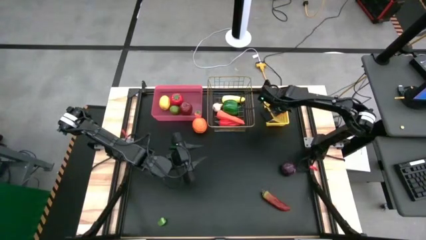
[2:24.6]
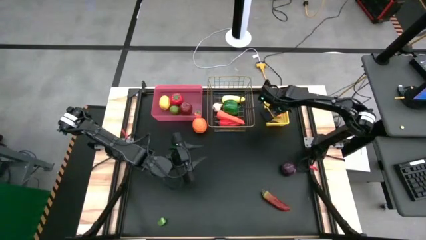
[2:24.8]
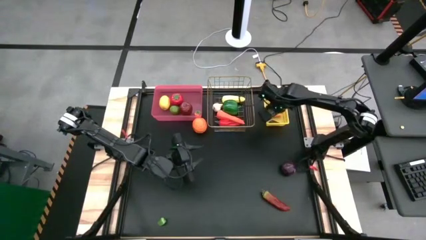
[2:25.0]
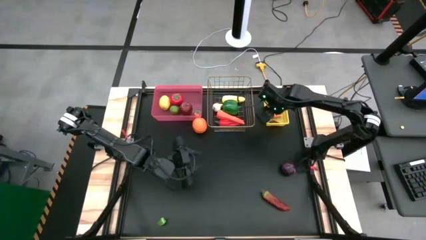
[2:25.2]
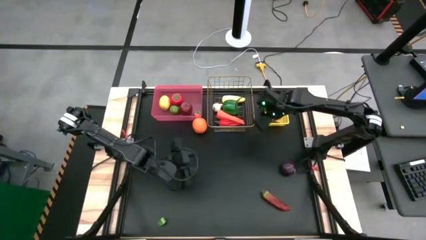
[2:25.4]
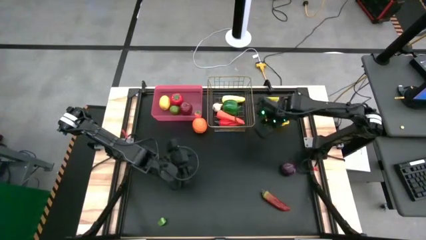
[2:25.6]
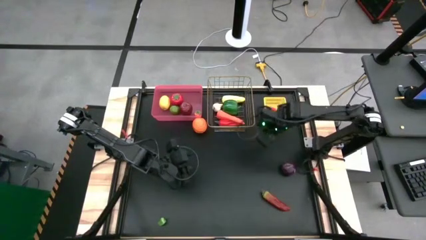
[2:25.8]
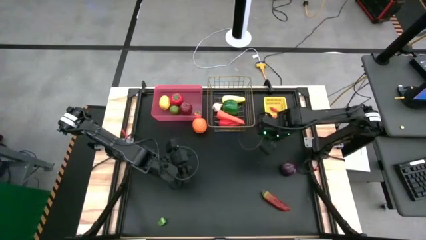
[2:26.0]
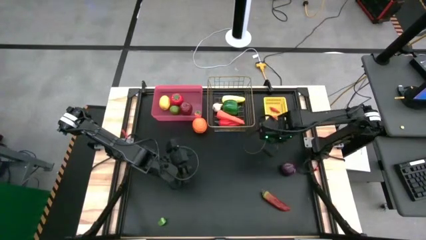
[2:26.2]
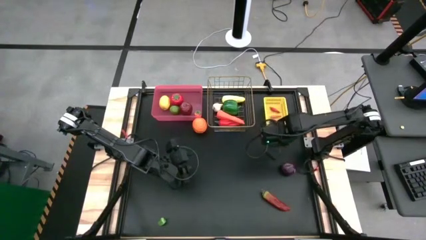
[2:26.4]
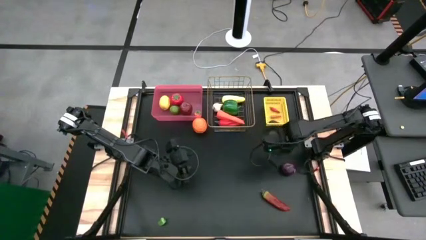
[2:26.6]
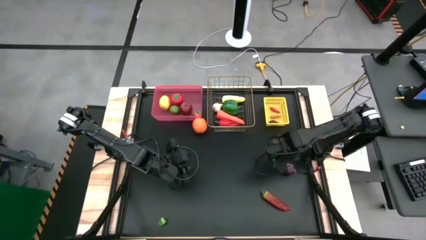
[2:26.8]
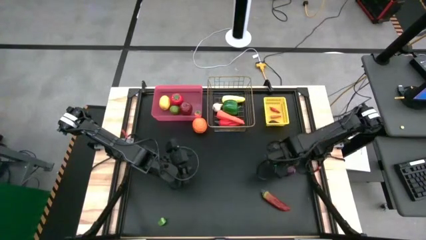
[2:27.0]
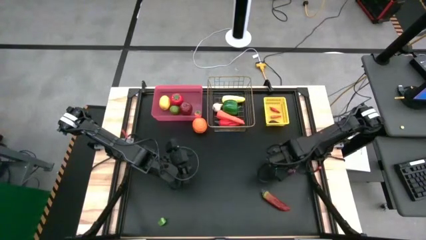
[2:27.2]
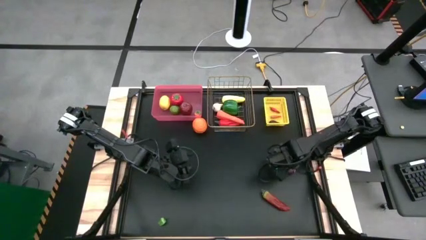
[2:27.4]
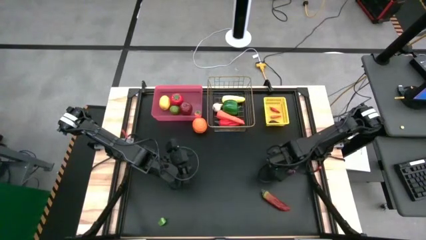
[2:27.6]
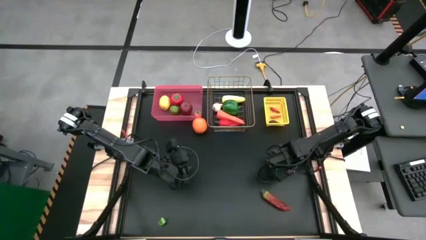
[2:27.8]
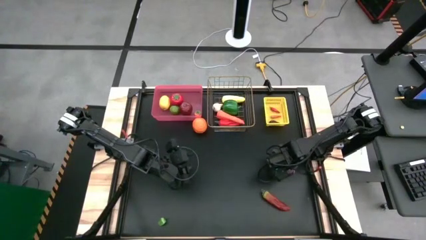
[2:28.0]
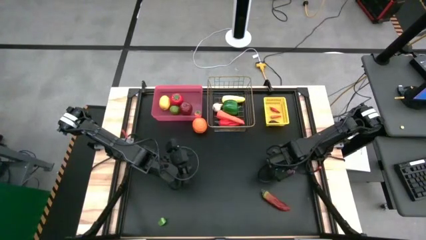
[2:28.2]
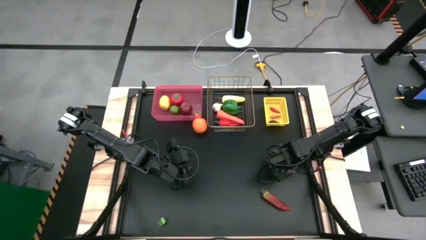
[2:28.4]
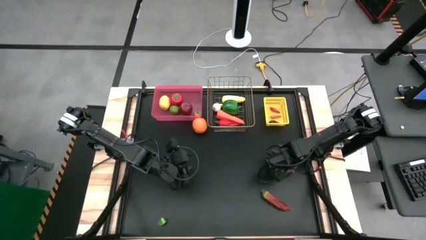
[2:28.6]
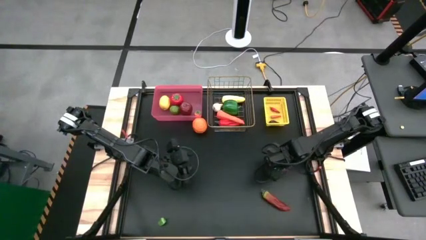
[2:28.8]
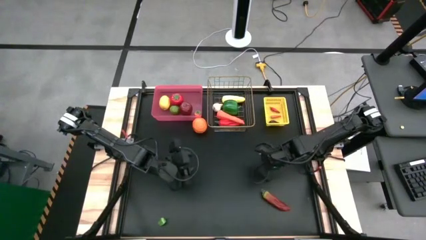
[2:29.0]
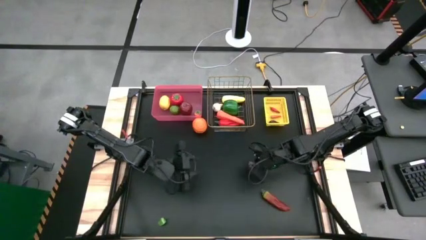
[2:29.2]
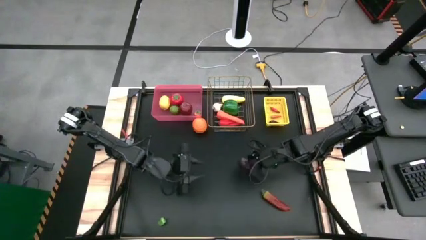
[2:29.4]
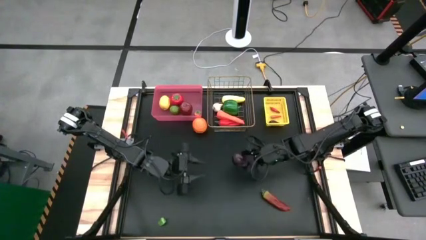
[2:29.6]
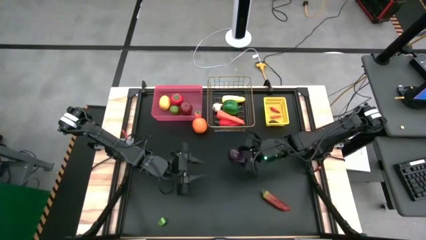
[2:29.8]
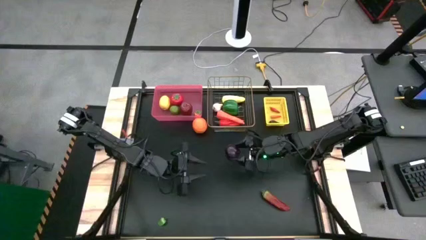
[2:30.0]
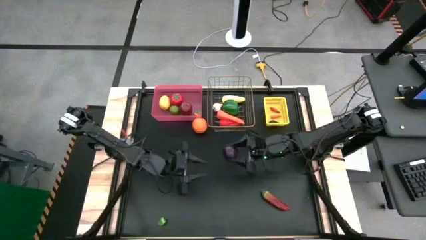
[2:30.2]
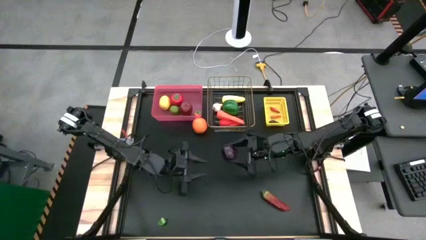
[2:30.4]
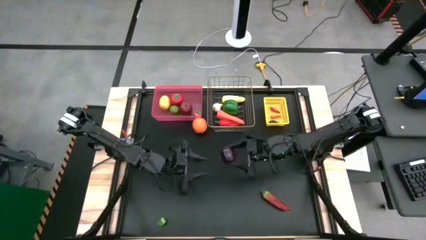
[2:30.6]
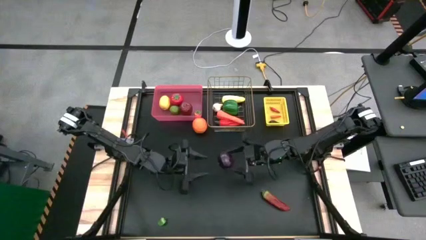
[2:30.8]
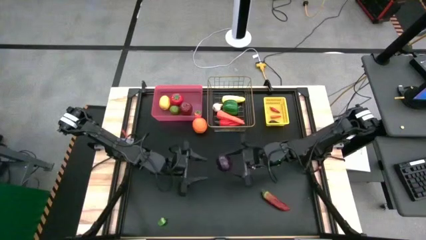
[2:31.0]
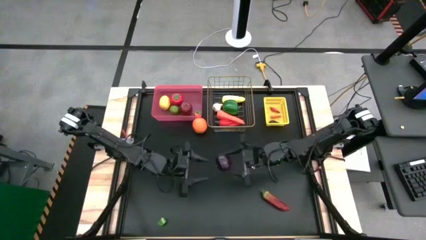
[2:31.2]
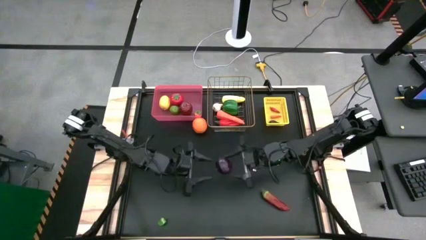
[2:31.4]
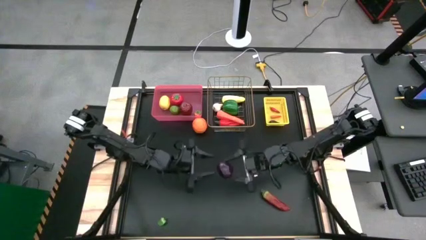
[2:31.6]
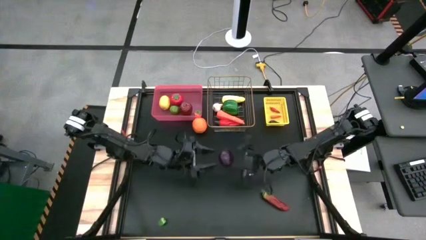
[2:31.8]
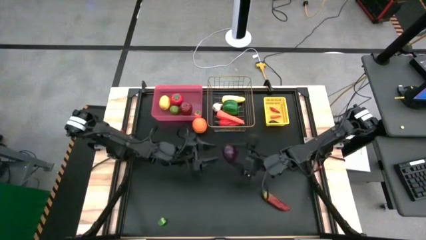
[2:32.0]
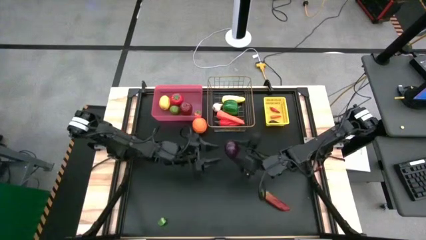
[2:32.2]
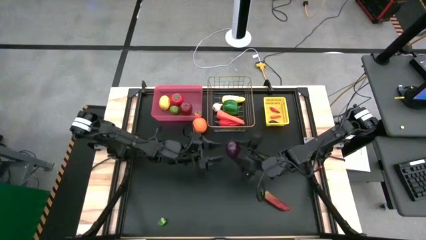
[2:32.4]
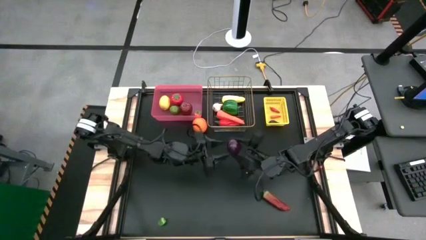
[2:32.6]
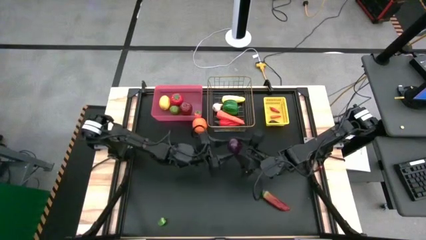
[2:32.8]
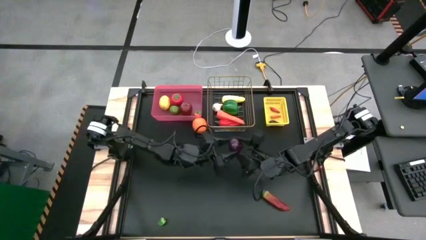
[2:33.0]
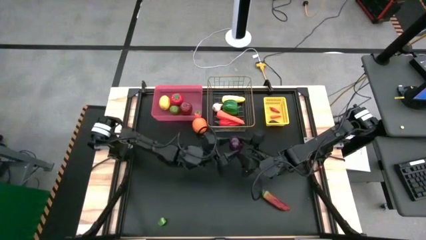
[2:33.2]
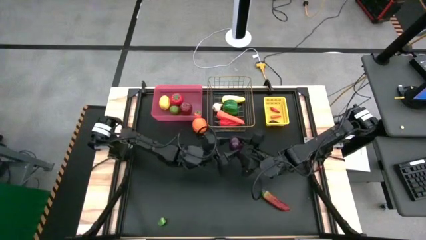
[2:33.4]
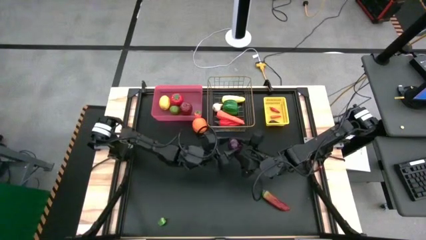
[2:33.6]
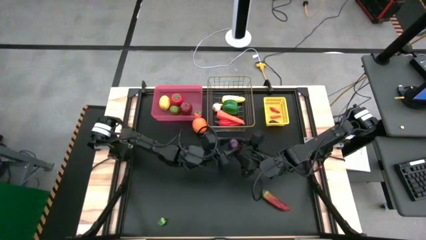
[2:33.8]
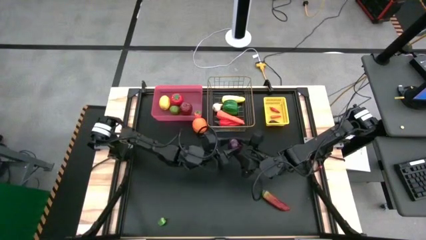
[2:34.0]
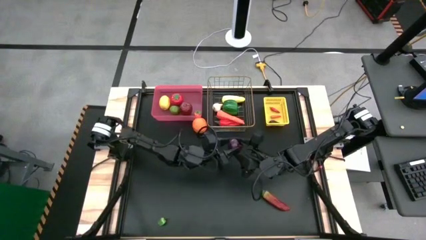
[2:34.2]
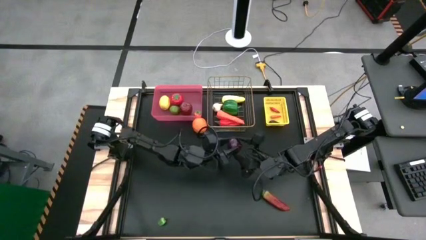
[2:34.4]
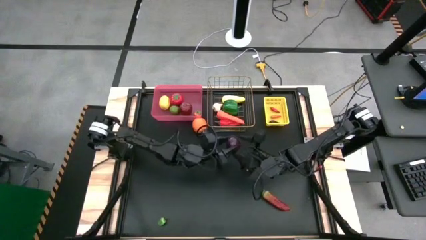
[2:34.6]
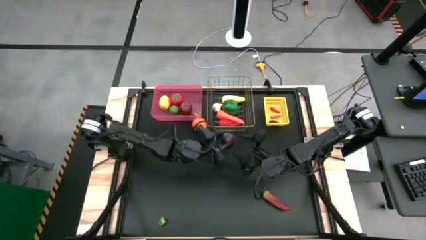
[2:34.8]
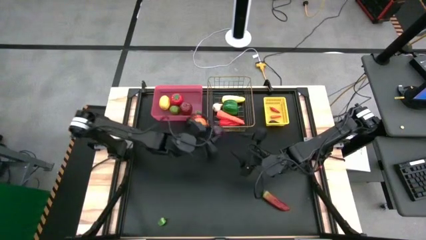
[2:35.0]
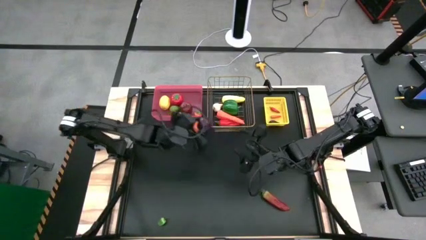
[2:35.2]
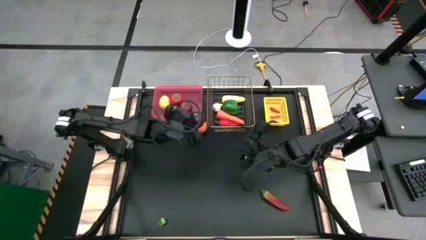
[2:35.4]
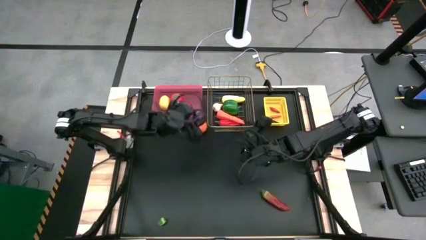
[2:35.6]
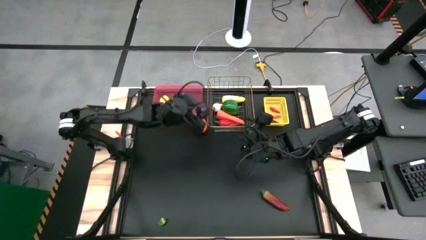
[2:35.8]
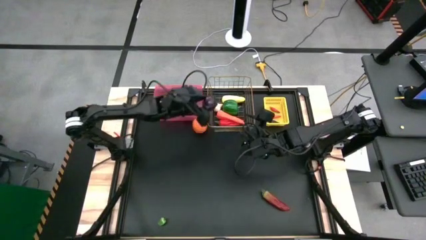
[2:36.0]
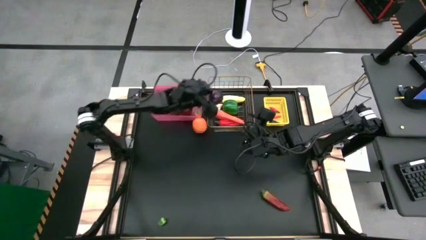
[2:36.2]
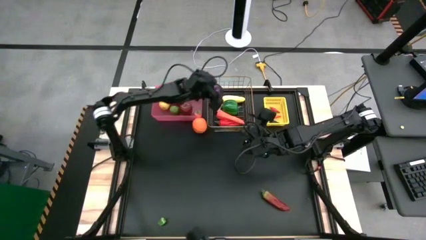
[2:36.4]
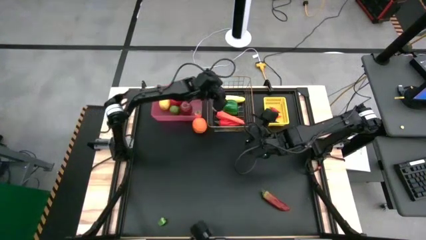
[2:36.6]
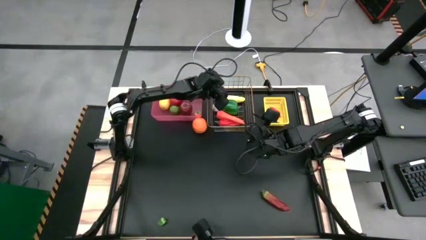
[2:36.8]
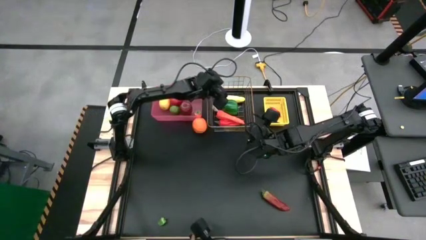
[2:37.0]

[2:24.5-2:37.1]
Task: Sort produce into baskets
Put the violet plum into the gold mesh basket

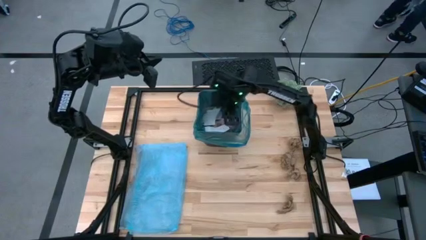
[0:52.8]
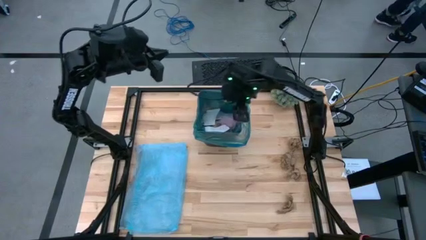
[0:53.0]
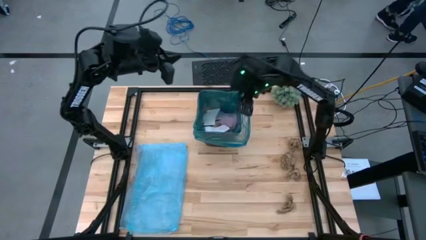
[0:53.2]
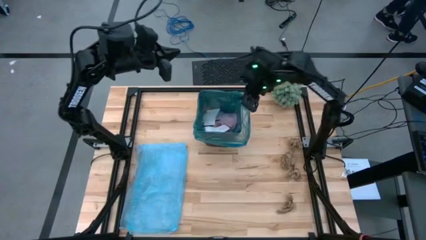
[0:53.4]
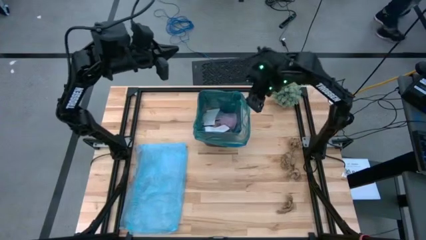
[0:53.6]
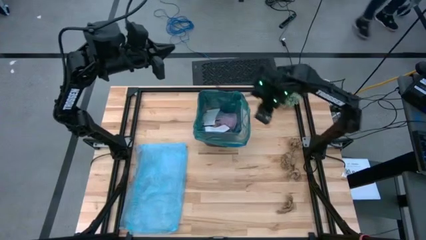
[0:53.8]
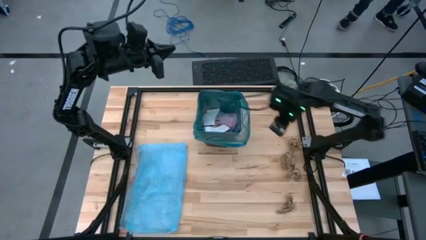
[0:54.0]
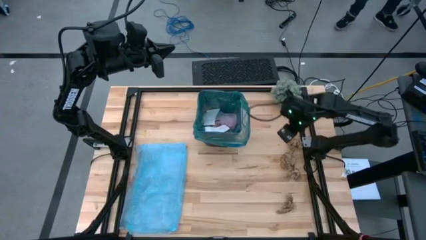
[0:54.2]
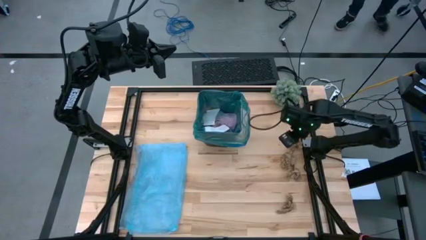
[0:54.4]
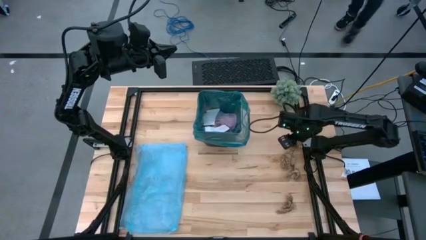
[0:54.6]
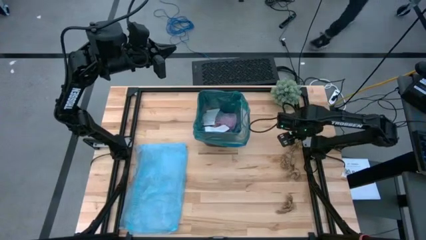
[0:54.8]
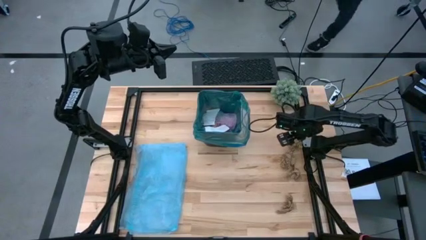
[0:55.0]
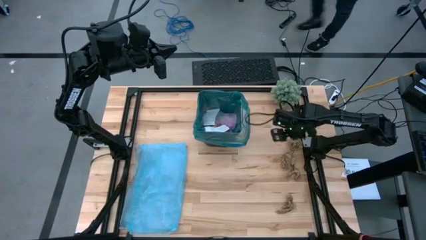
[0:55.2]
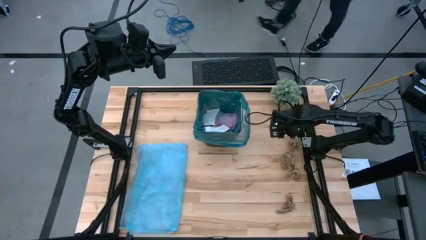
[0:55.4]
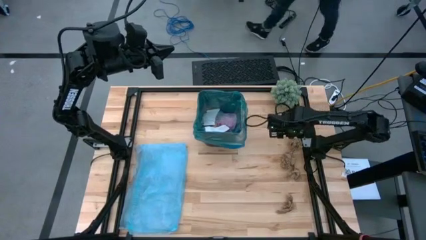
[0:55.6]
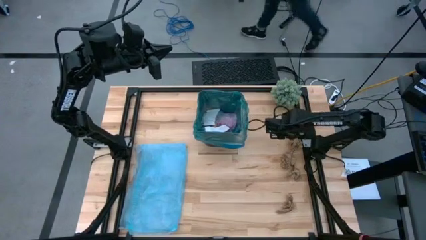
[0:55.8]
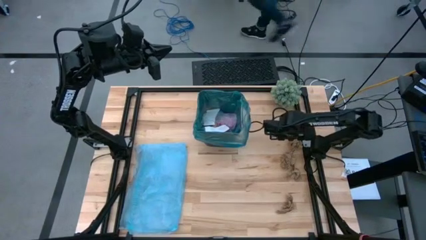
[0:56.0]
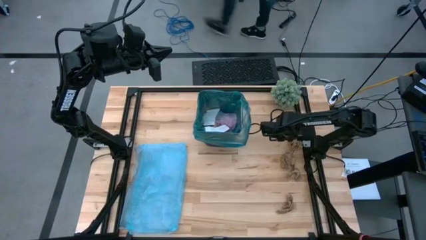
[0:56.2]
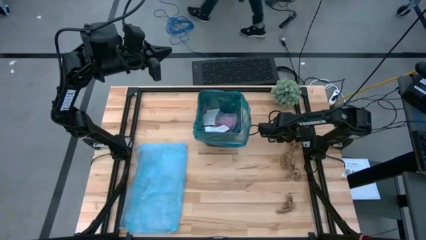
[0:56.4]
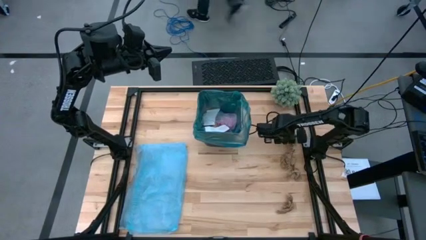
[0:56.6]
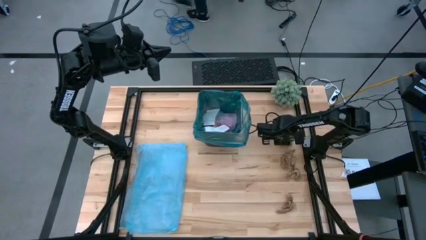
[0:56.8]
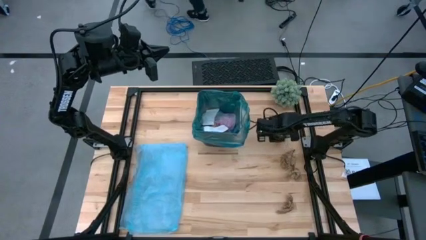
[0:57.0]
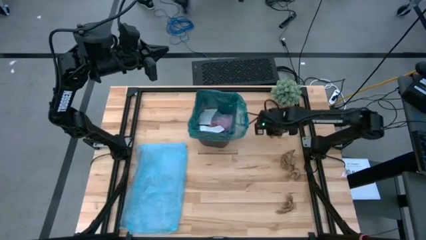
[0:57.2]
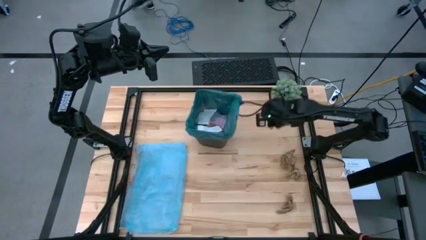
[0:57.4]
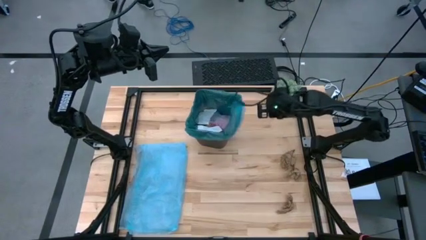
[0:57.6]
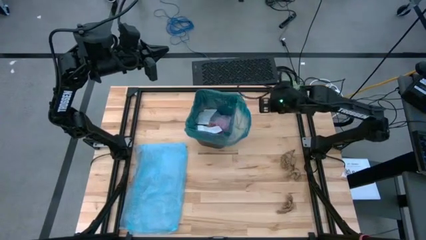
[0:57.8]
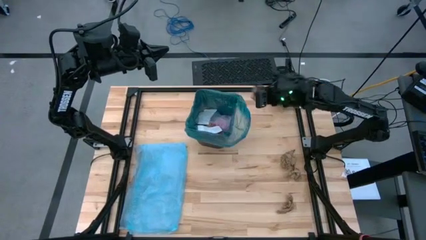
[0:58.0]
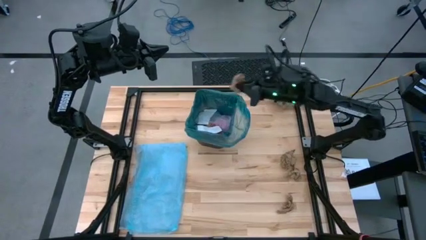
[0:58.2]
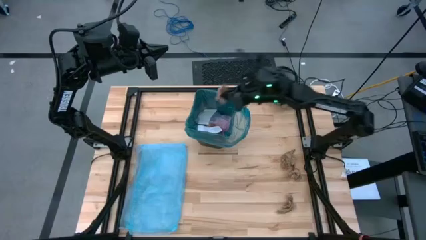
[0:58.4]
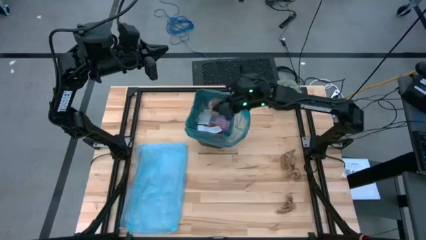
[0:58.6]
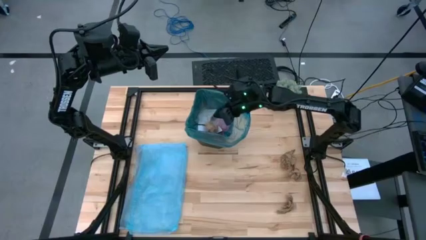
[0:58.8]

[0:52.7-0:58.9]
Task: place trash/remove bag and relplace
Put the brown napkin into the trash bin
